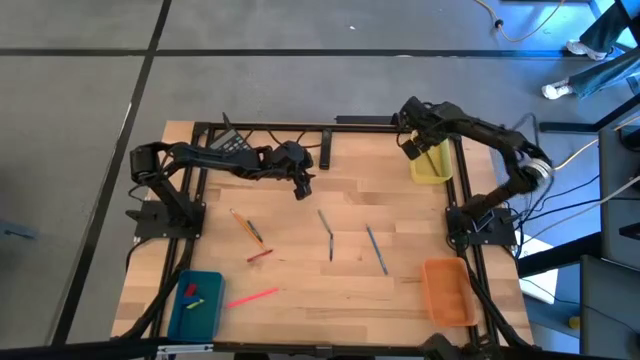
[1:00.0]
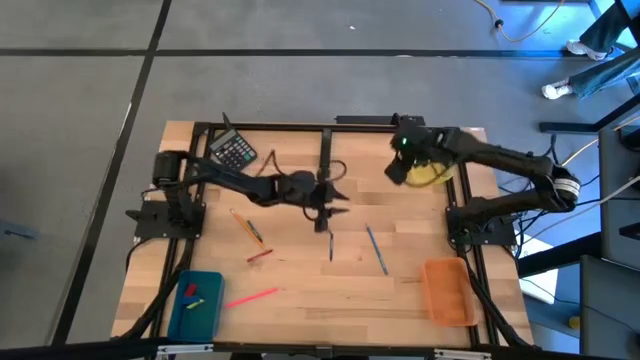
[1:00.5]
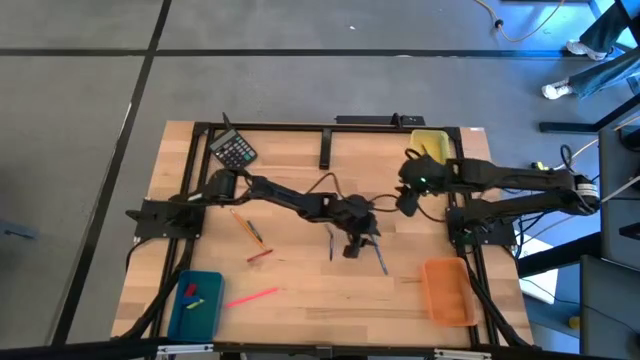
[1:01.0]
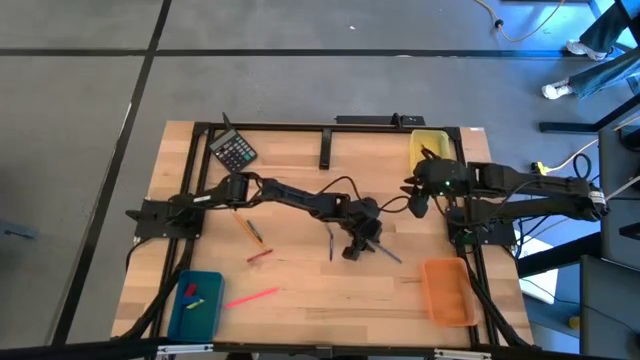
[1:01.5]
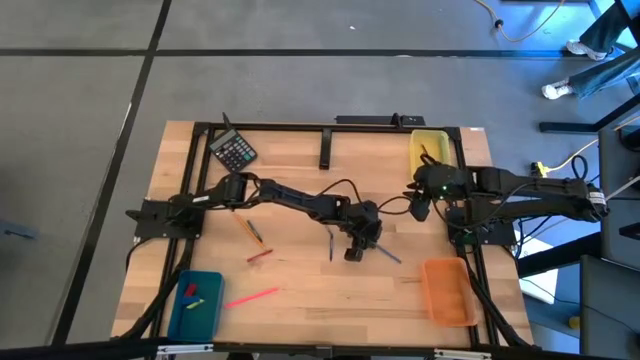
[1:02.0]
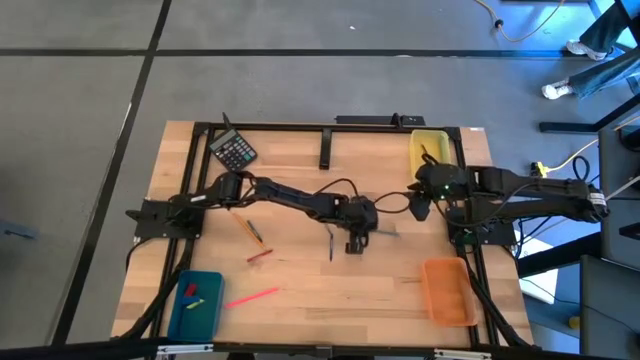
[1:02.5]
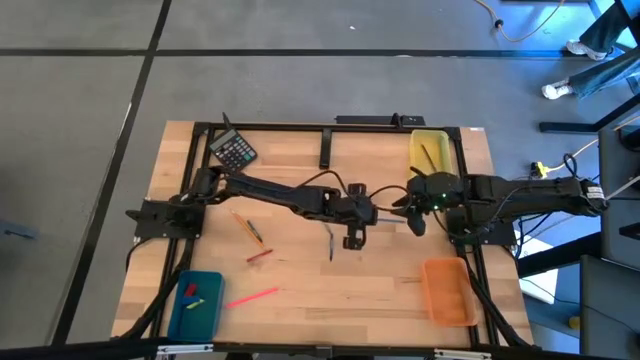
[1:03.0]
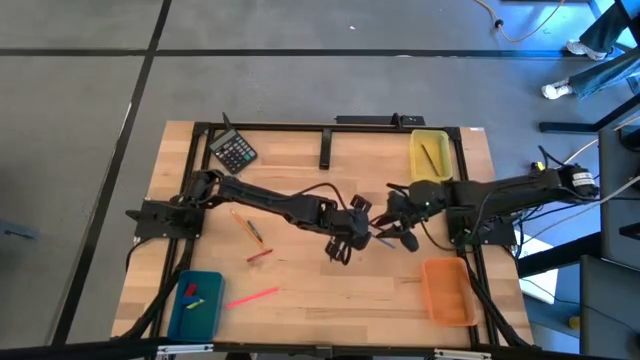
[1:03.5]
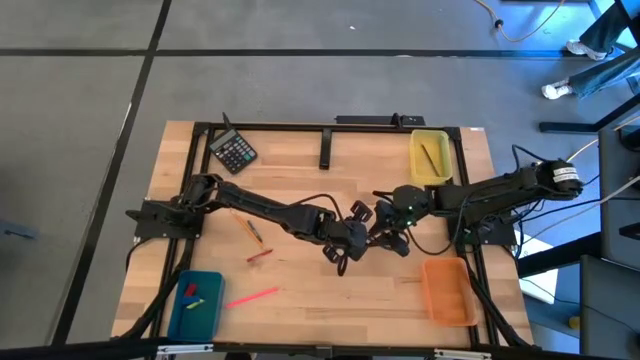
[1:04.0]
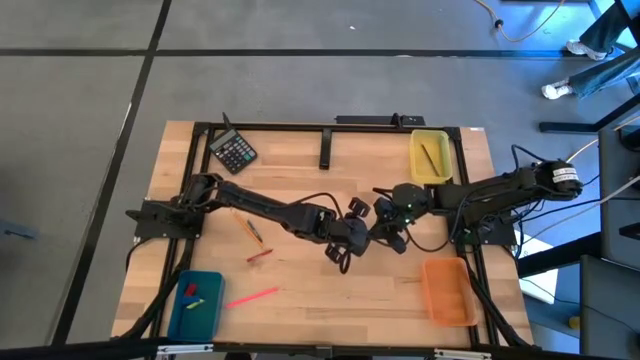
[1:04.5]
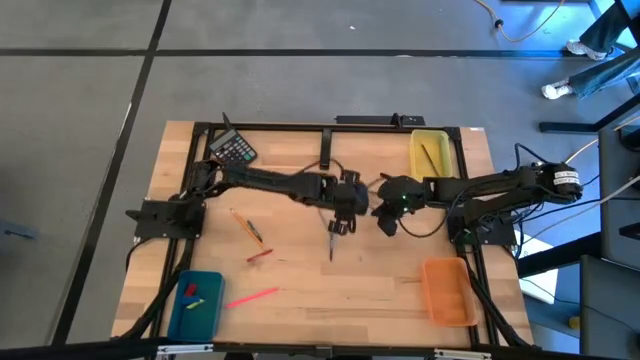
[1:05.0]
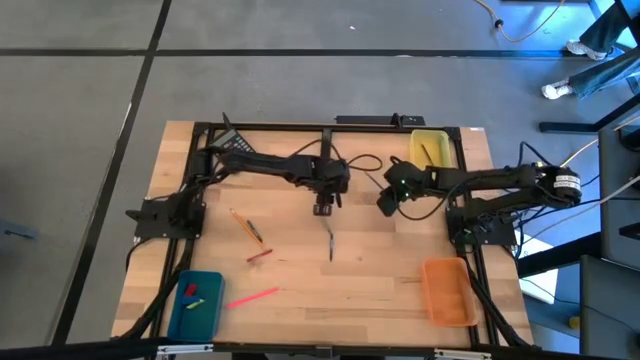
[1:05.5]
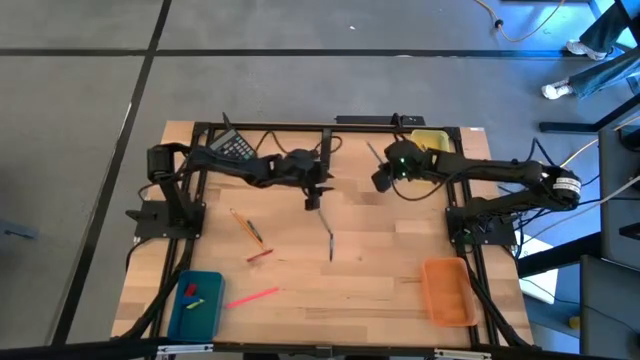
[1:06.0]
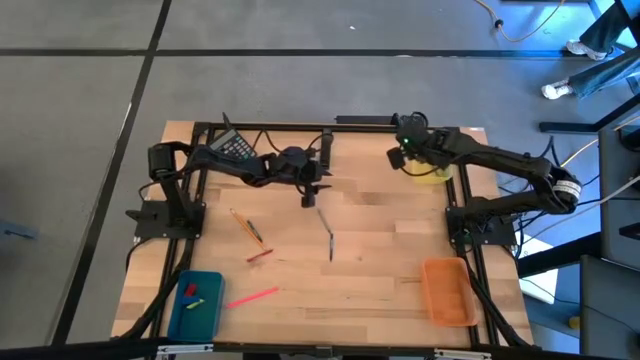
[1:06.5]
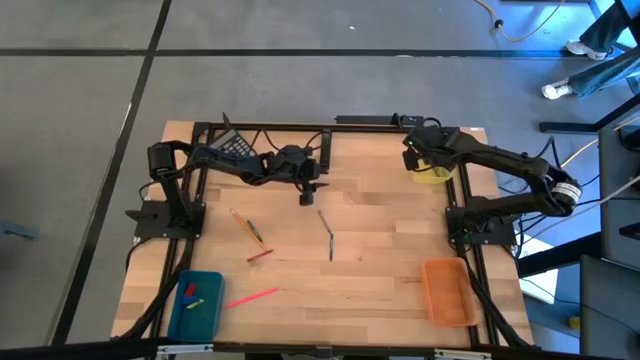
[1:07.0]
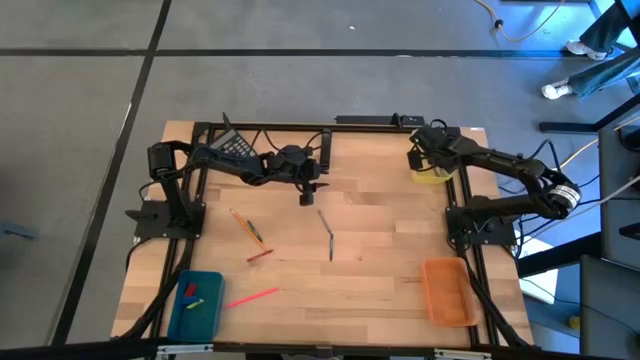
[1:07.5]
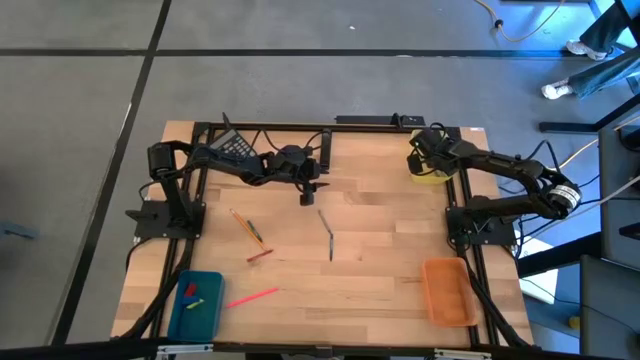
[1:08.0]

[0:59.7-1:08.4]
Task: Sort crayons/erasers/pens/pencils in bins
Put the blue pencil into the yellow bin

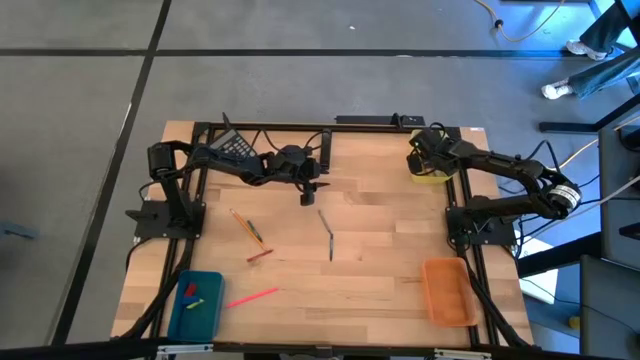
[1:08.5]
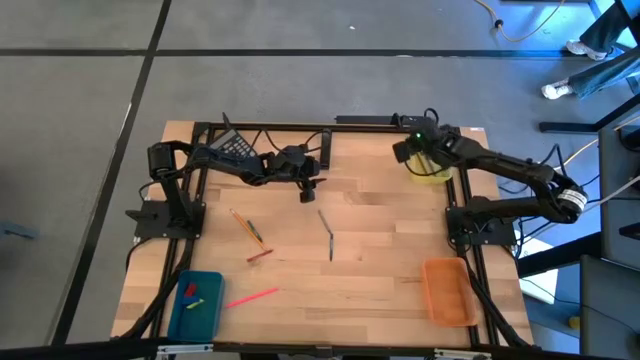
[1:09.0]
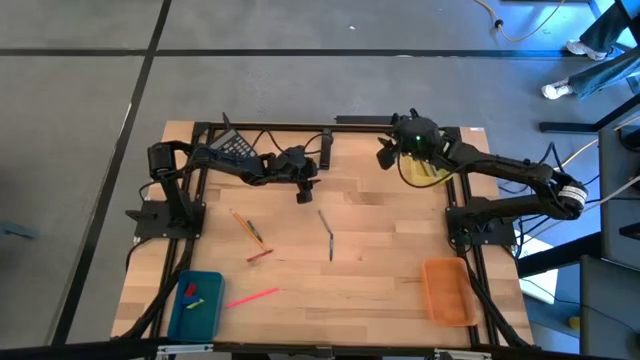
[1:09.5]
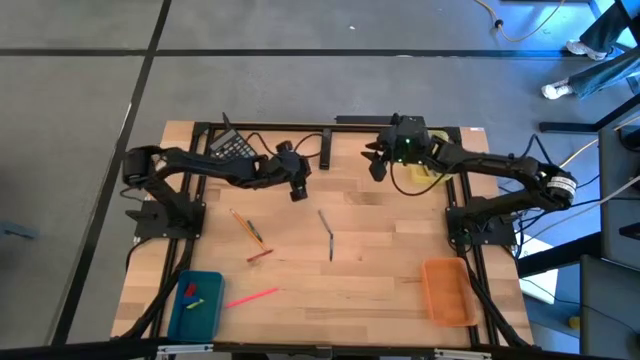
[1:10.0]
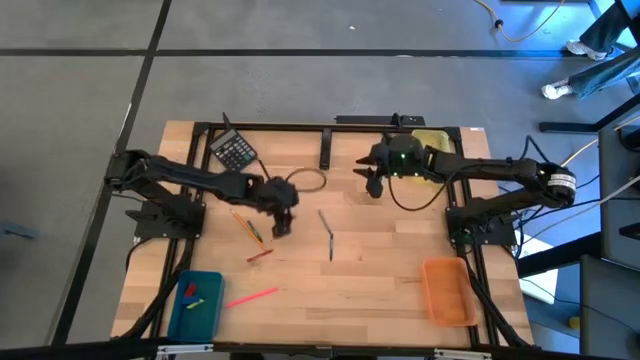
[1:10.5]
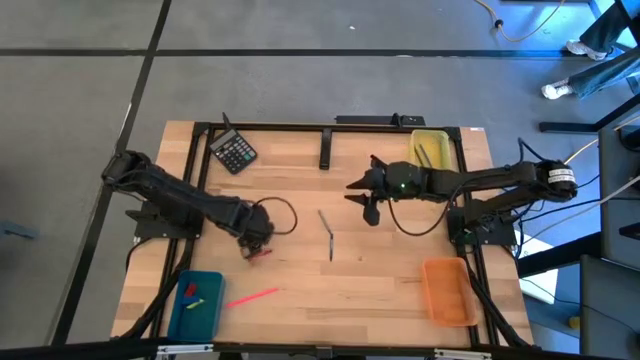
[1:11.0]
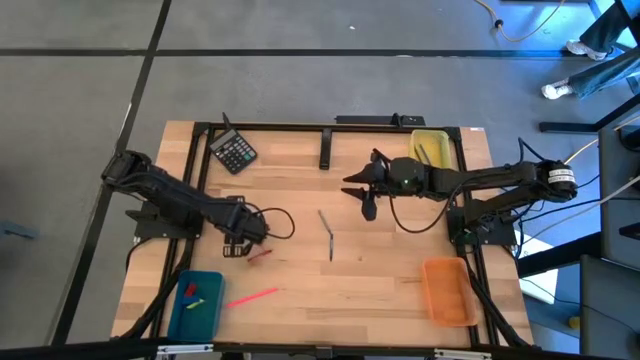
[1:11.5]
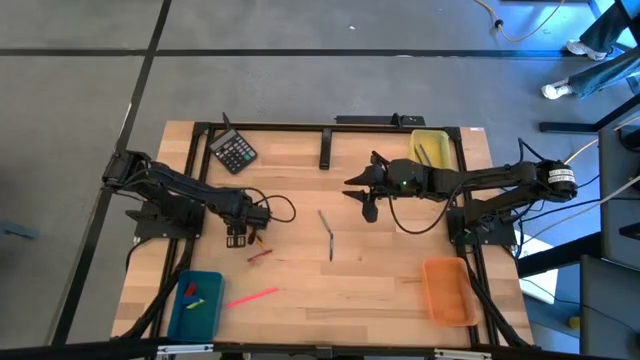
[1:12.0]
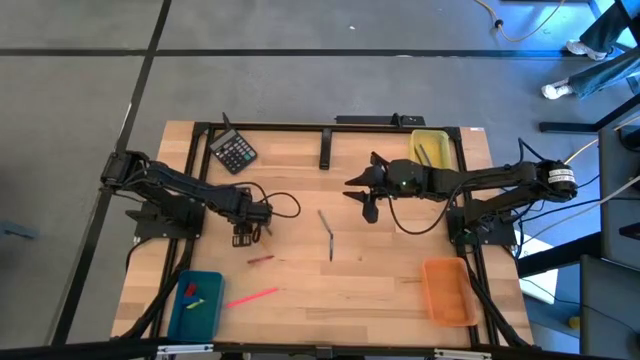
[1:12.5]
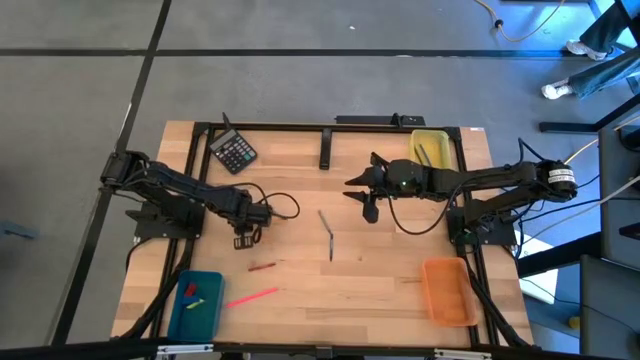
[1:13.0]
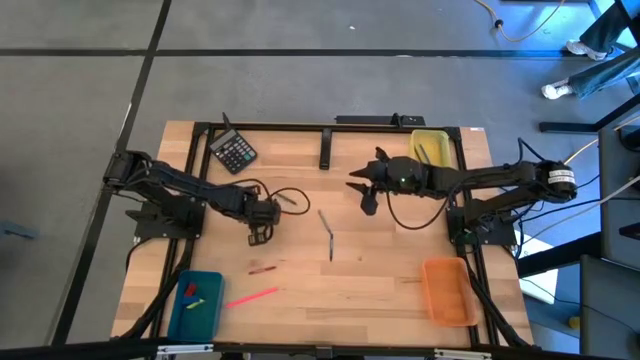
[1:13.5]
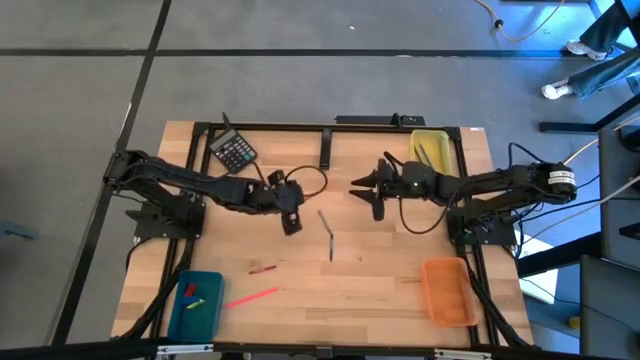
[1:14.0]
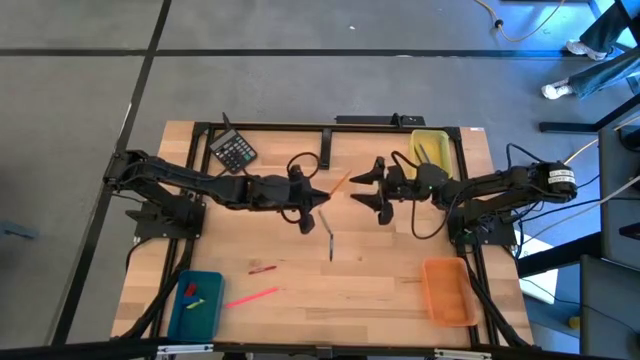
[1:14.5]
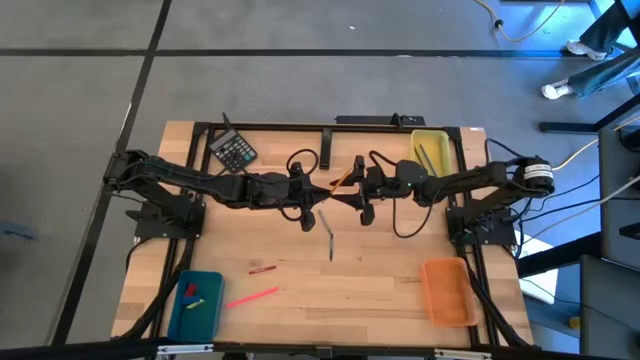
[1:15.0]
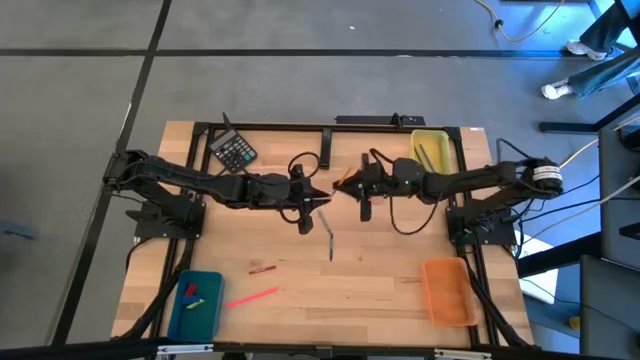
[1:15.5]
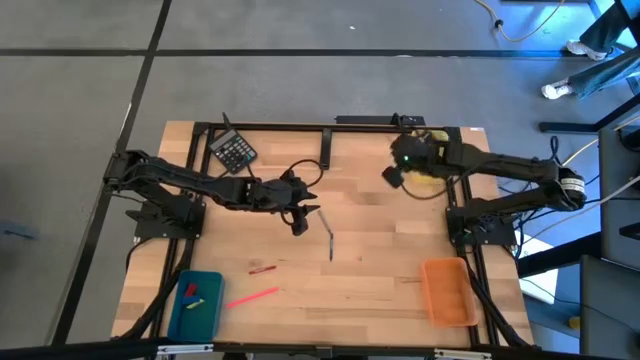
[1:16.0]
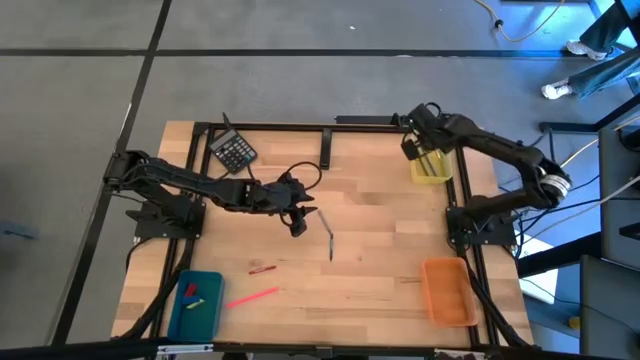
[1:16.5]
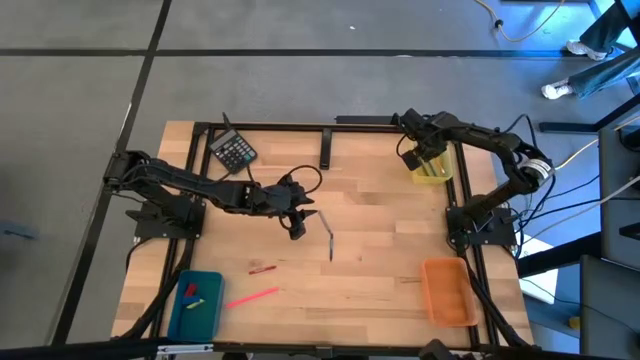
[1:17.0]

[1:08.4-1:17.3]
Put the orange pencil into the yellow bin

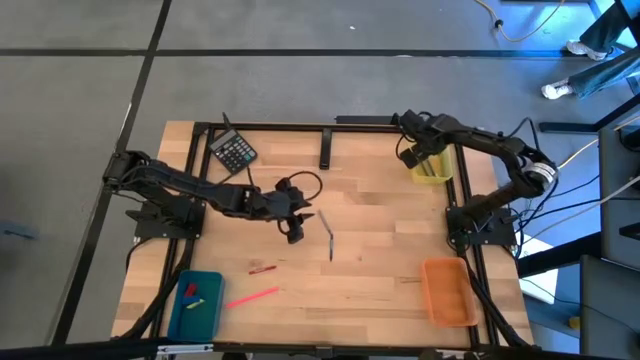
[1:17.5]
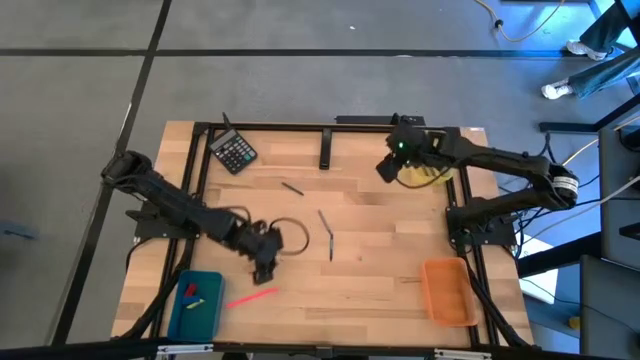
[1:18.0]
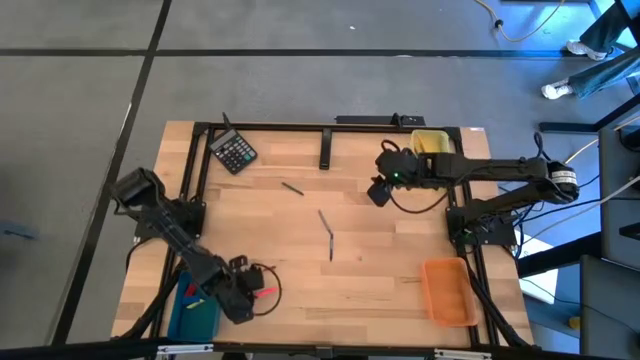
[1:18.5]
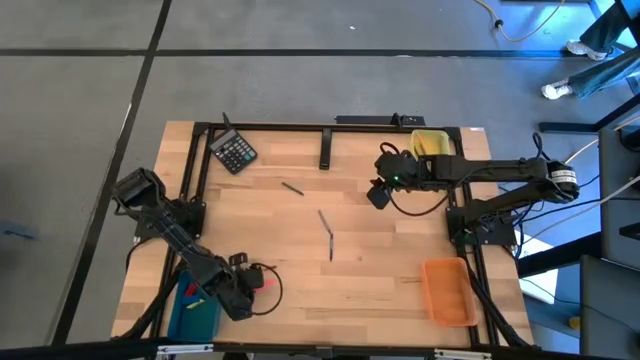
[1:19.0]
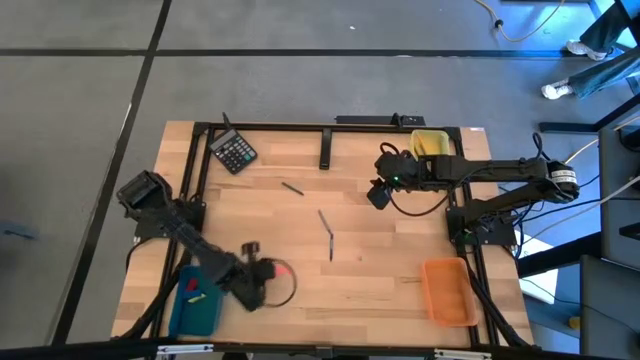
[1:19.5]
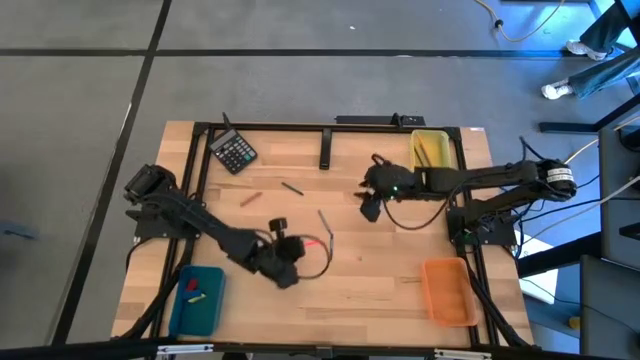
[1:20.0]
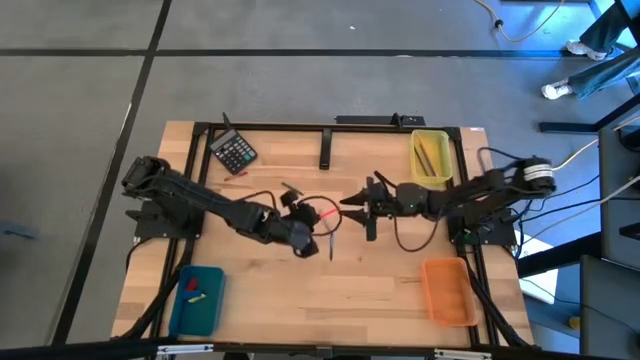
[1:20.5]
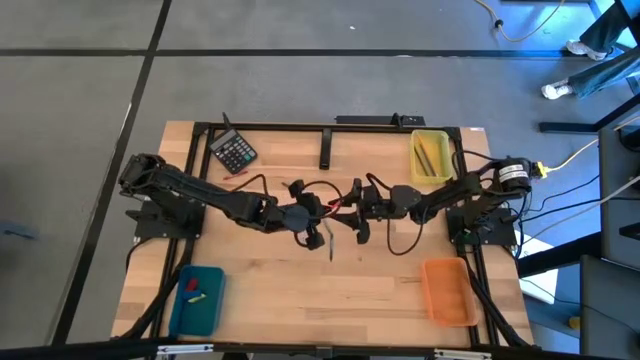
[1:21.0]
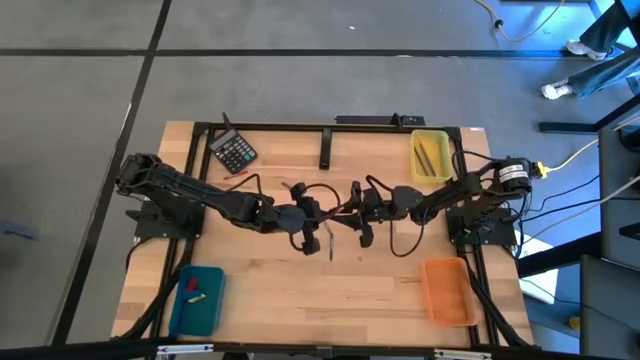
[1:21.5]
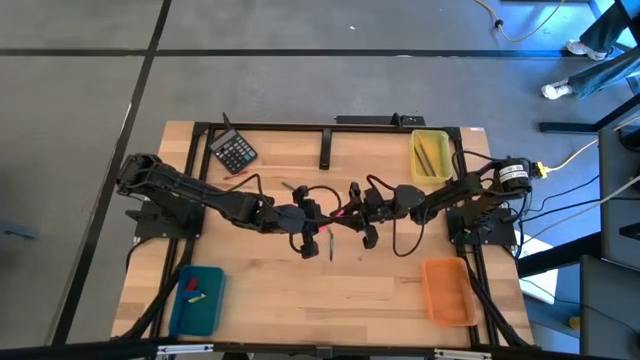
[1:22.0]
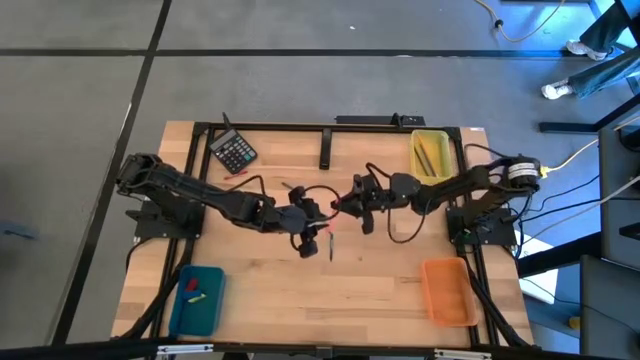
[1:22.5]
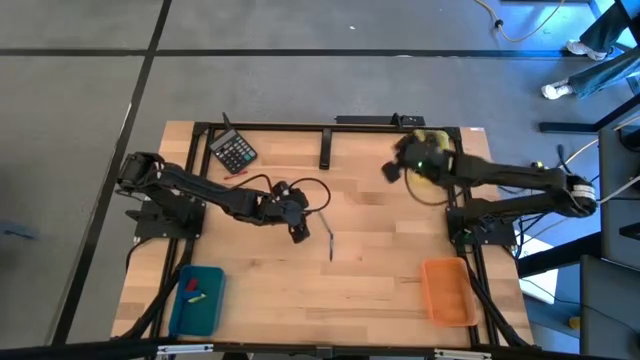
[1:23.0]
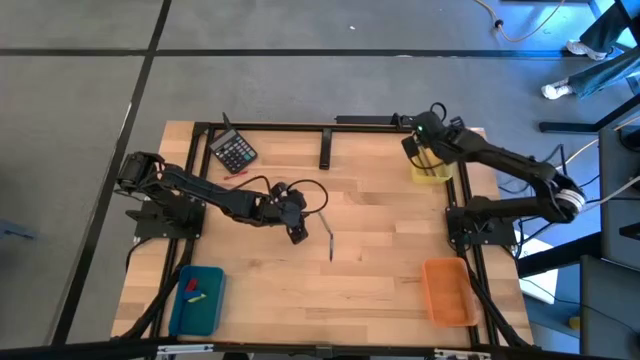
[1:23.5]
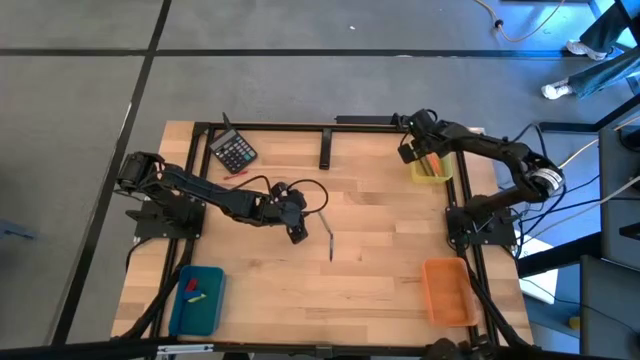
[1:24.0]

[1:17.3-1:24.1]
Put the pink pencil into the yellow bin
